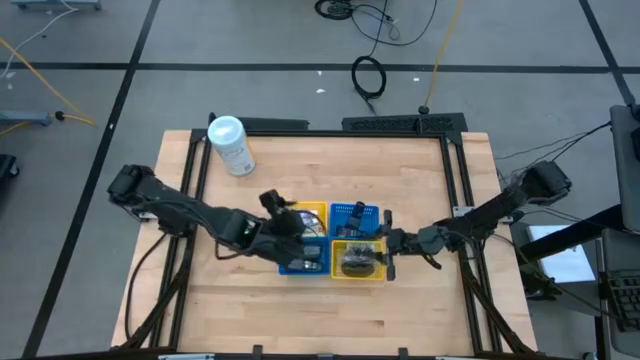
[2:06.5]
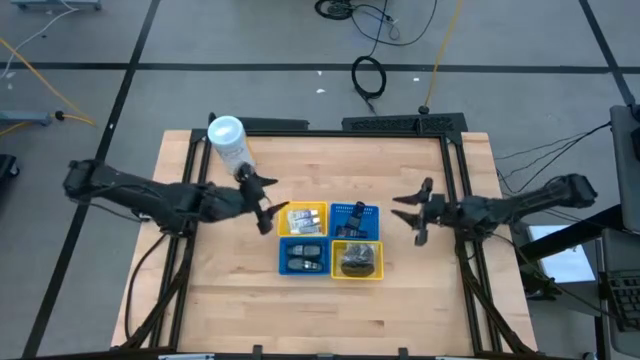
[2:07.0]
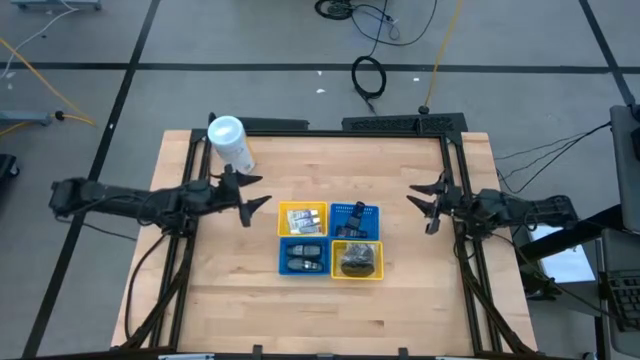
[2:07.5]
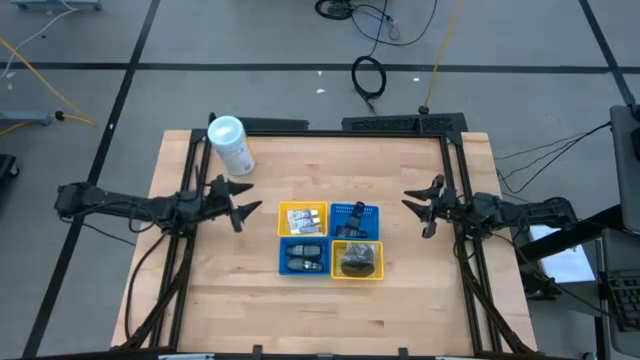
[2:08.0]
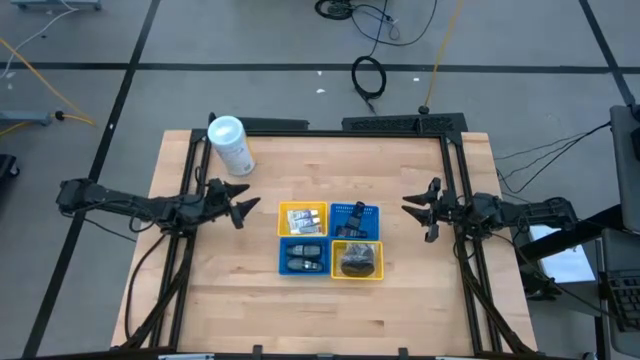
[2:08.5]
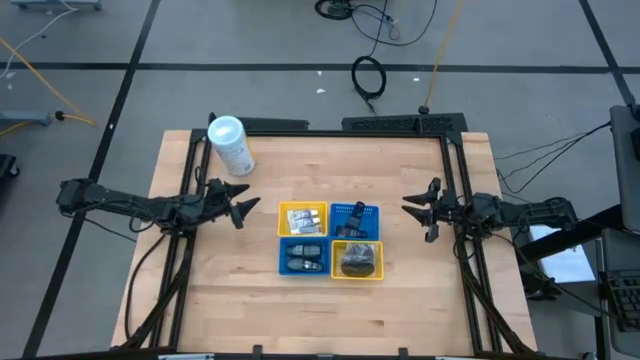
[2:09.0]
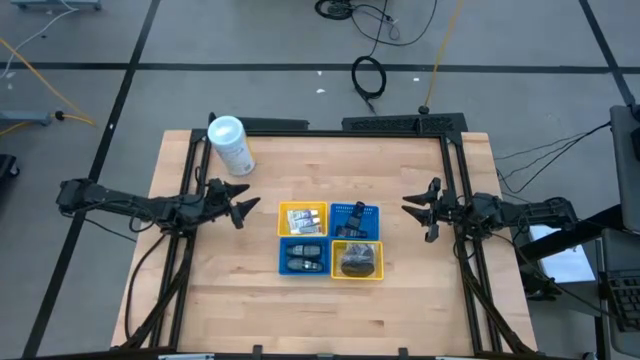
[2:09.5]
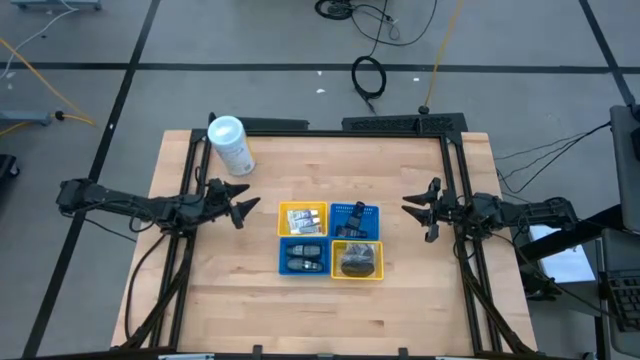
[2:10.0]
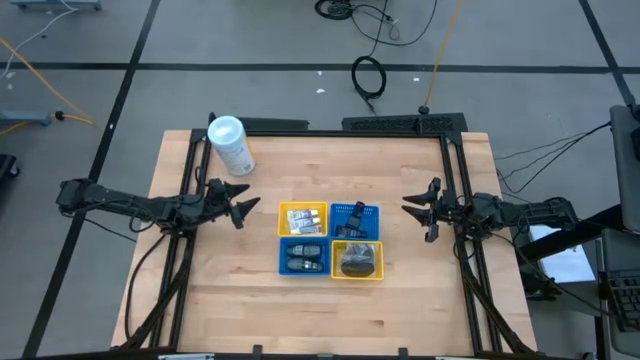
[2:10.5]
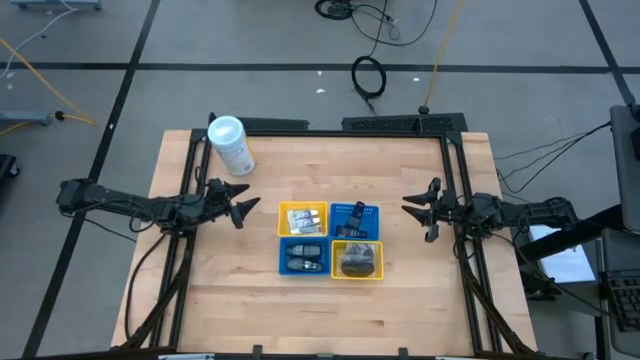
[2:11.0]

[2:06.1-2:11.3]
Task: Pick & Place Travel size toiletries
Return to Home Position

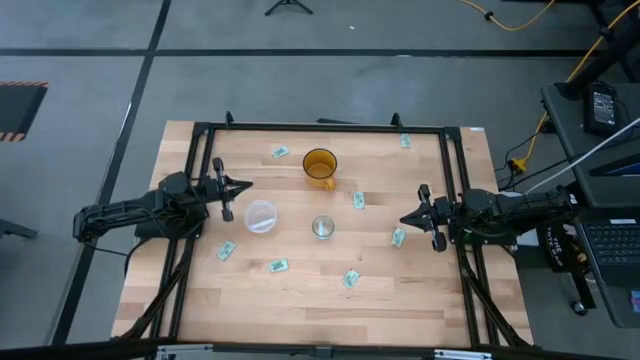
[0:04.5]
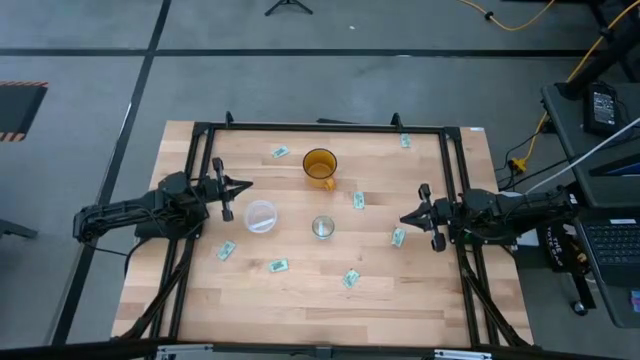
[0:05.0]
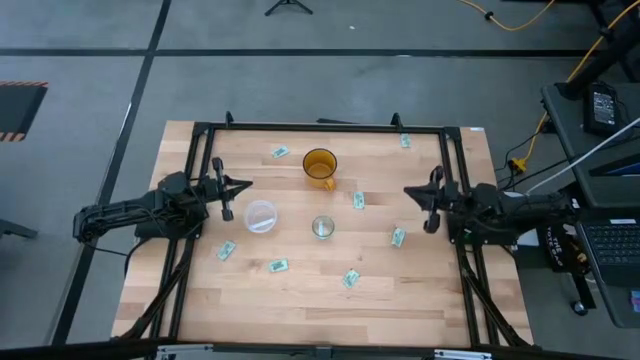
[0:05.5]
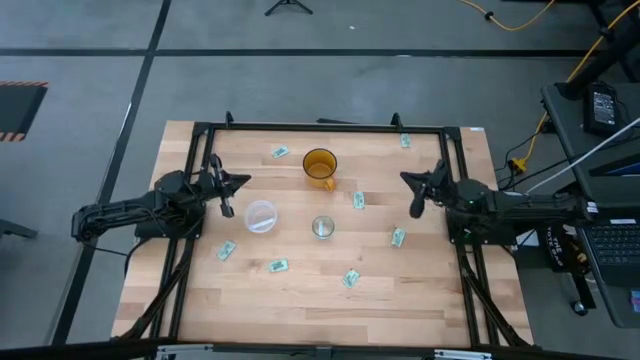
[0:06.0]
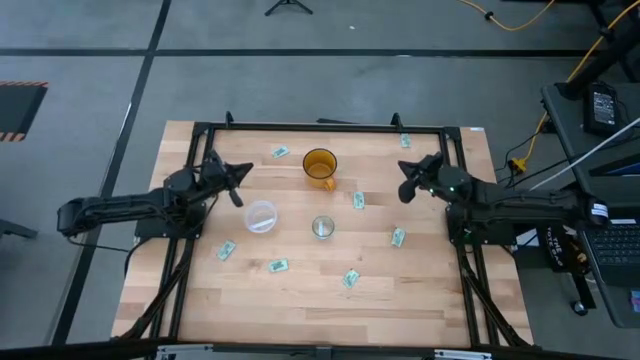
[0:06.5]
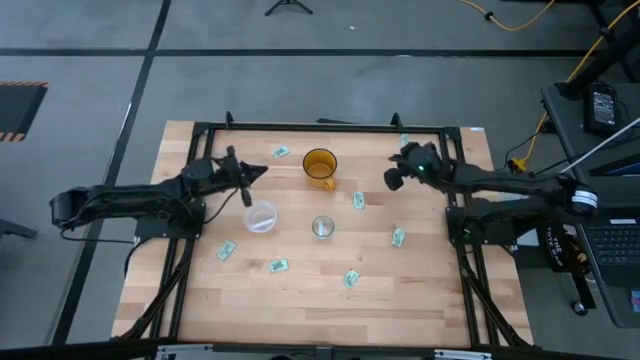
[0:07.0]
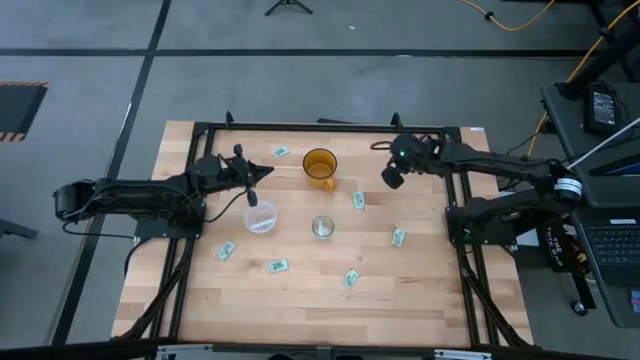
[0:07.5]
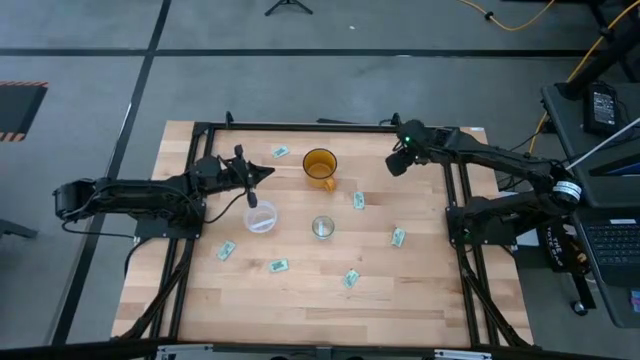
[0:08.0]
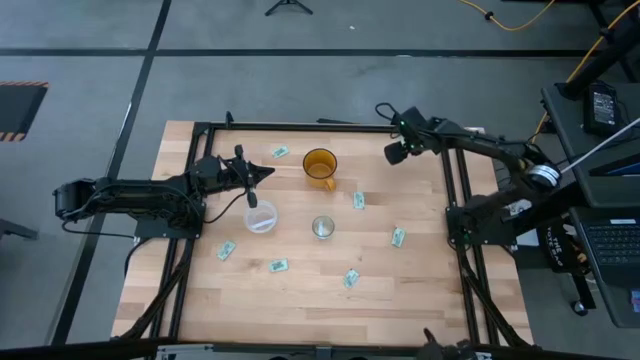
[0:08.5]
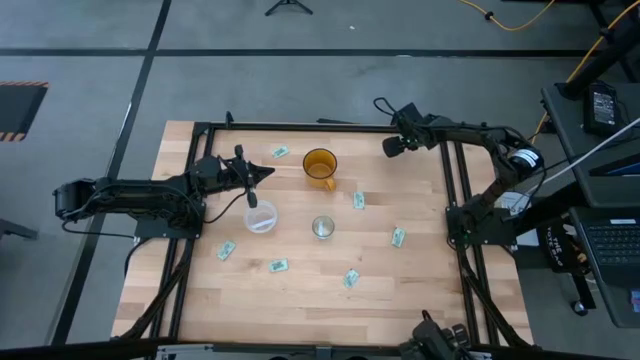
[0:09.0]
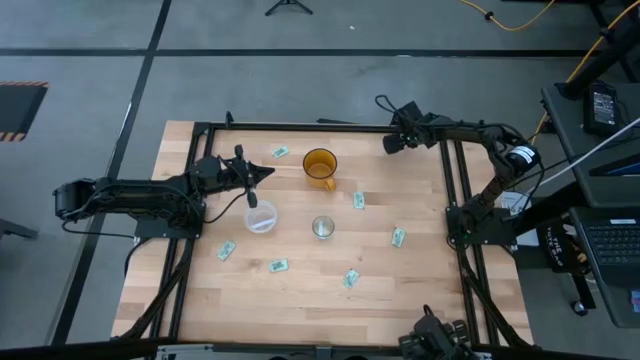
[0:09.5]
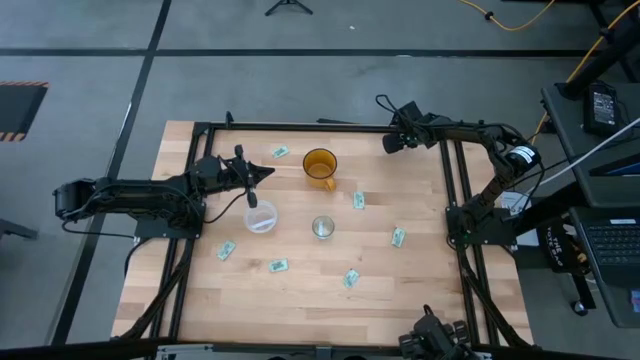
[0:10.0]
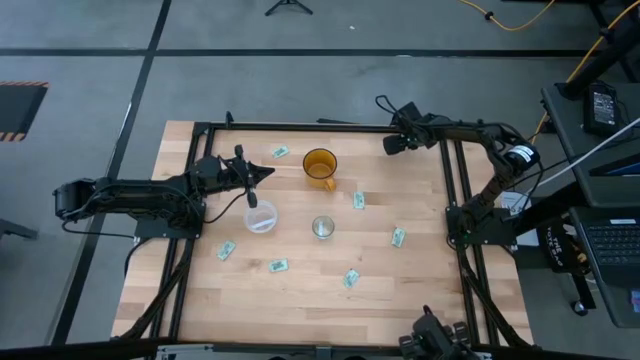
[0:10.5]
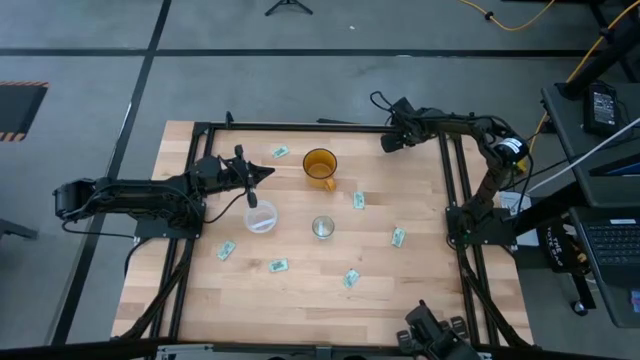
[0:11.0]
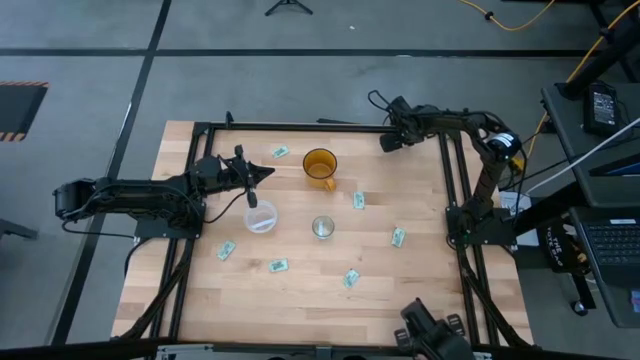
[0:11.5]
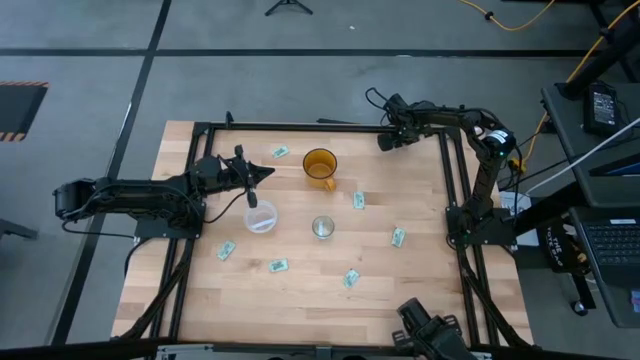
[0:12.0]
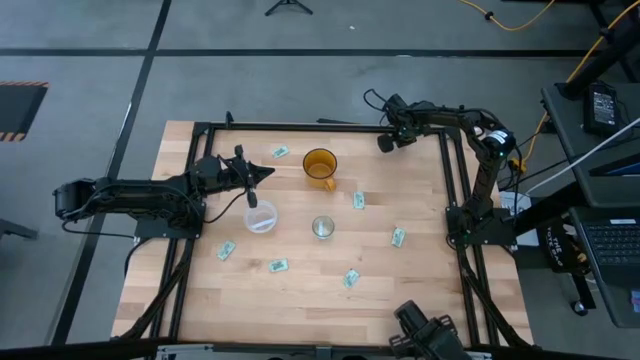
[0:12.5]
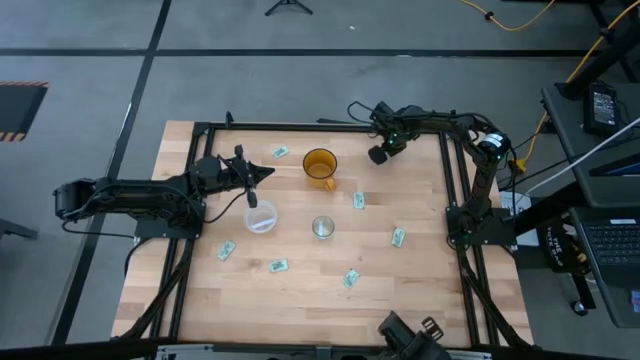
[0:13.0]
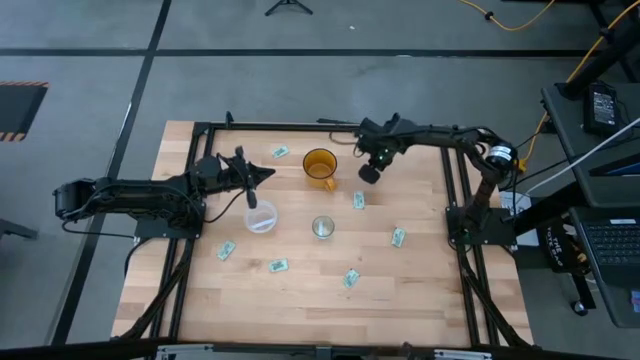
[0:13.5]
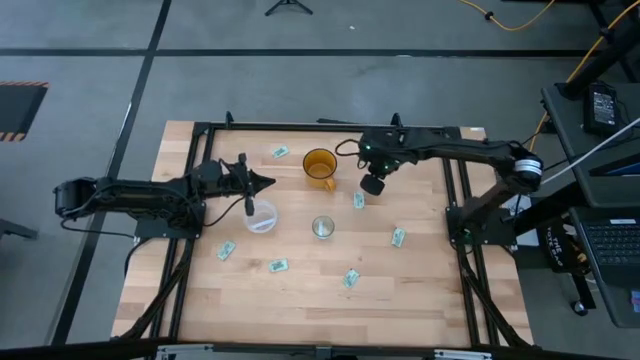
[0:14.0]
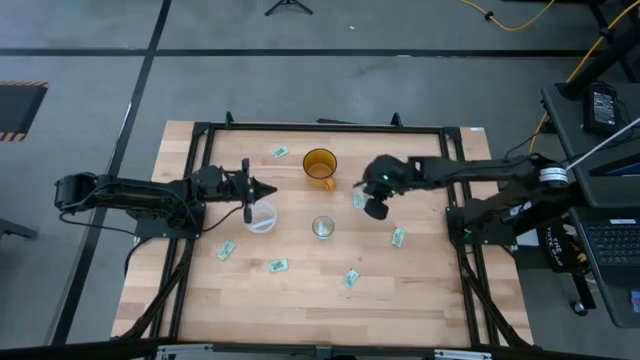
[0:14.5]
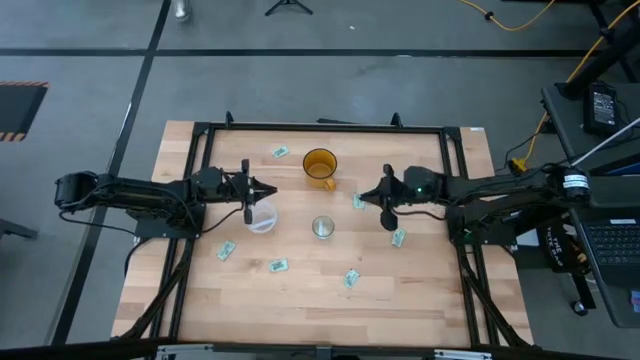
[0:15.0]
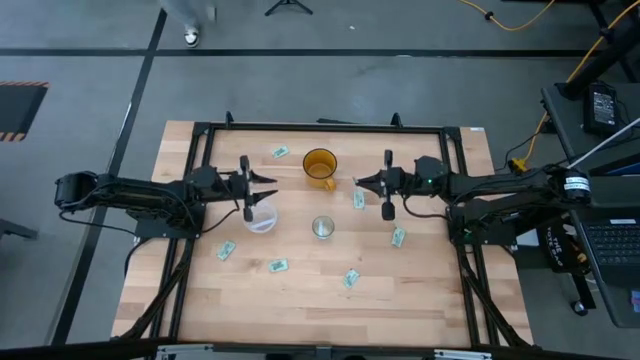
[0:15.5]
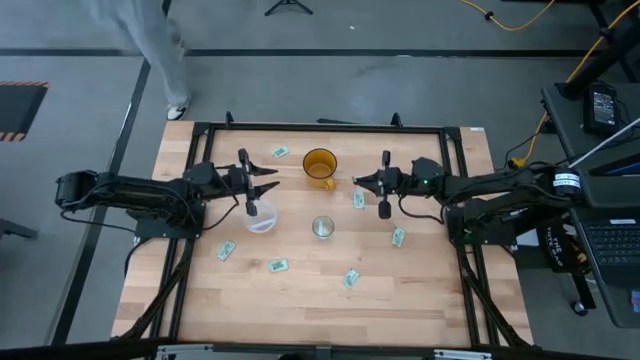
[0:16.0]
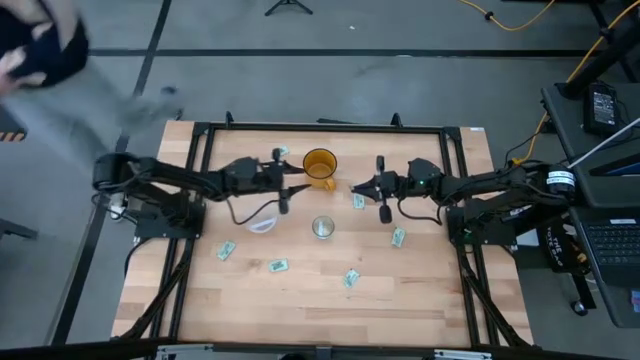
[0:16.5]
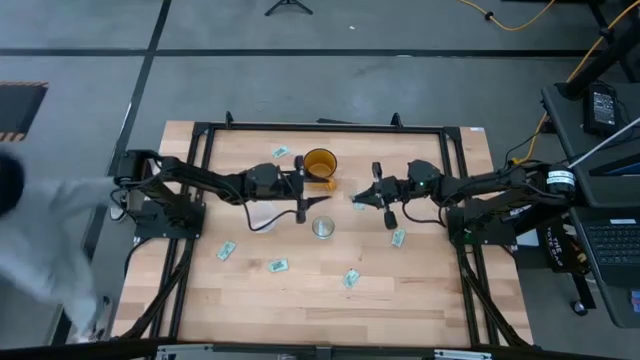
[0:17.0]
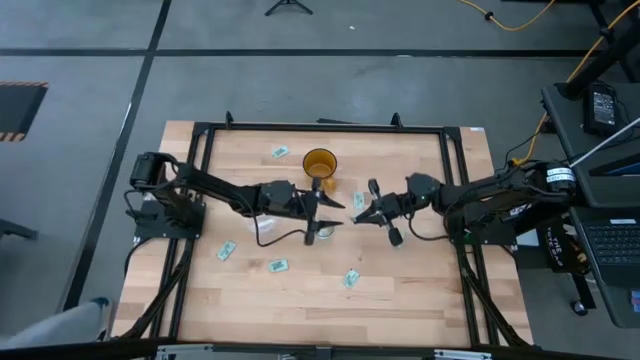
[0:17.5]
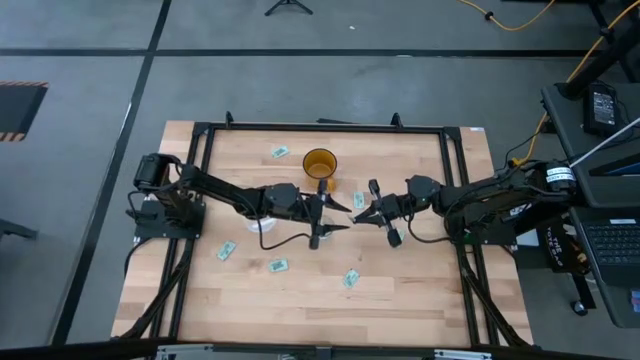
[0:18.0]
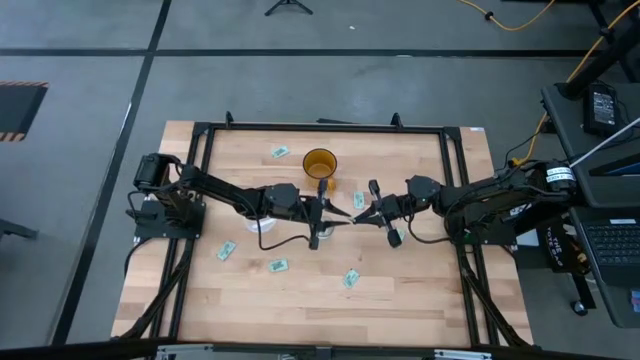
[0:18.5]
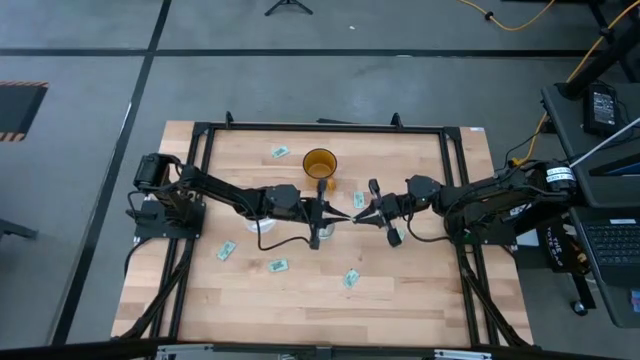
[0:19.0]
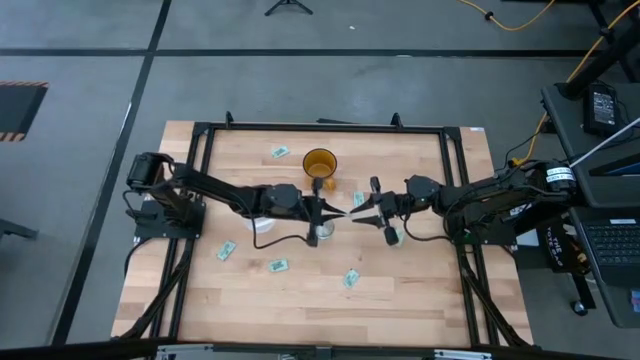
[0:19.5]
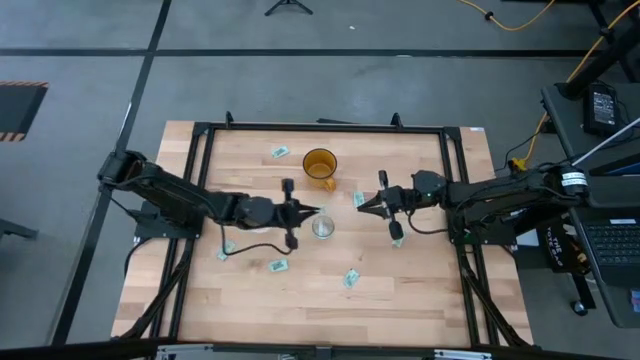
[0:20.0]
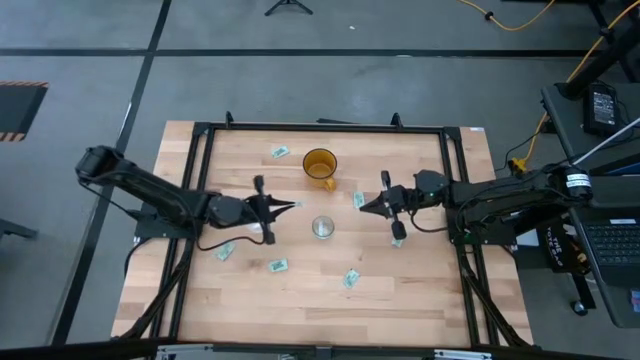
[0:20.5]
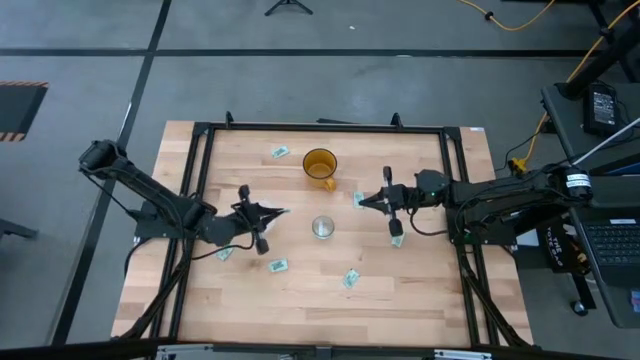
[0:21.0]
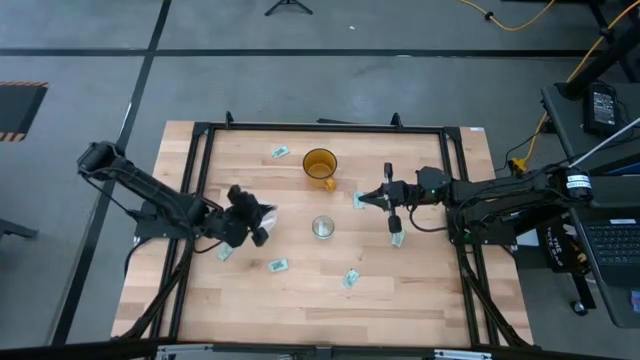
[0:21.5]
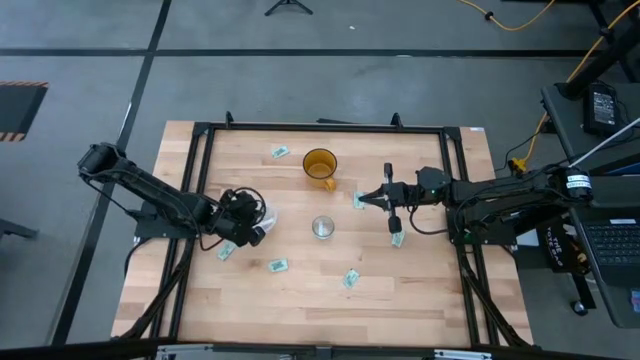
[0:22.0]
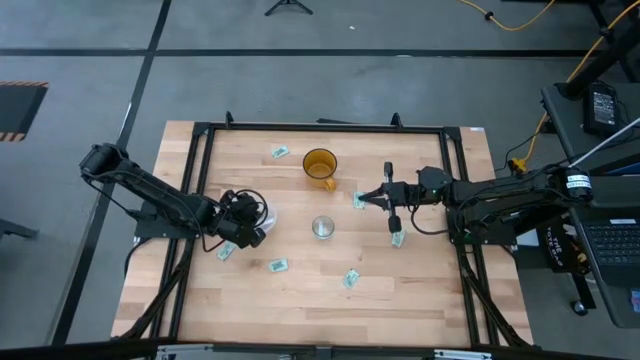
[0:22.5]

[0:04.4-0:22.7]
Task: Pick and place Stevia / Truvia into bins
Put the stevia packet into the plastic tupperware
